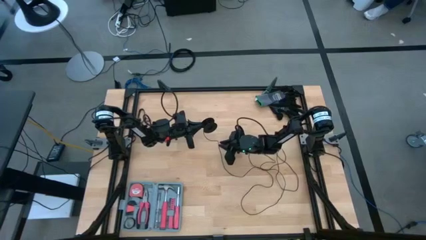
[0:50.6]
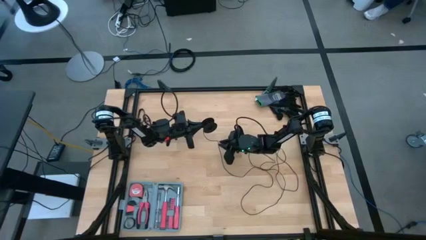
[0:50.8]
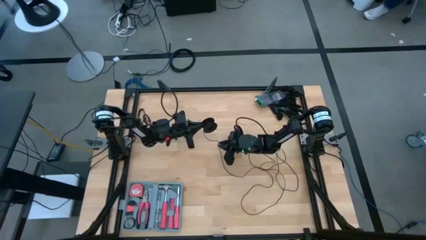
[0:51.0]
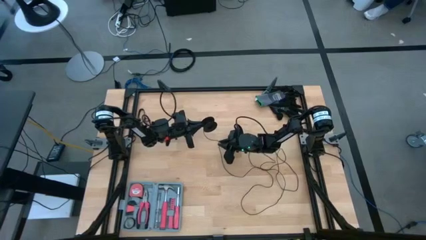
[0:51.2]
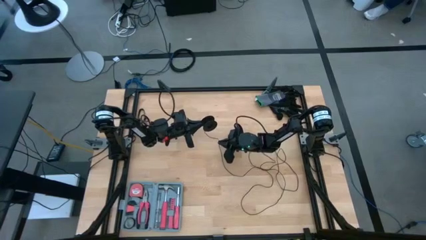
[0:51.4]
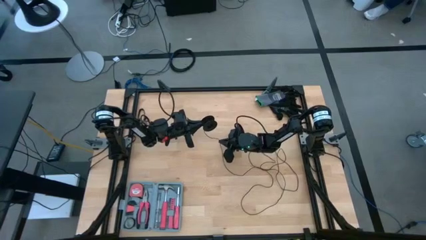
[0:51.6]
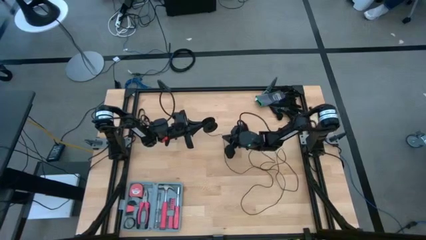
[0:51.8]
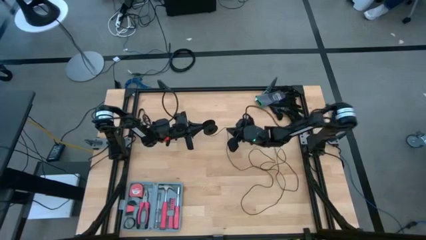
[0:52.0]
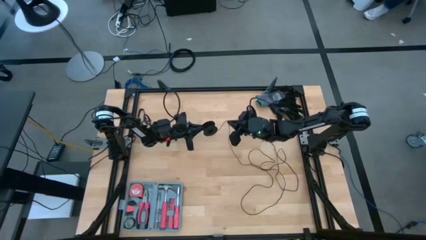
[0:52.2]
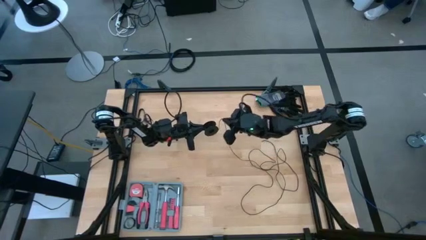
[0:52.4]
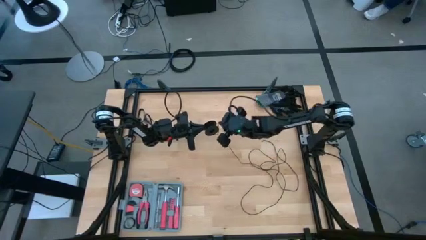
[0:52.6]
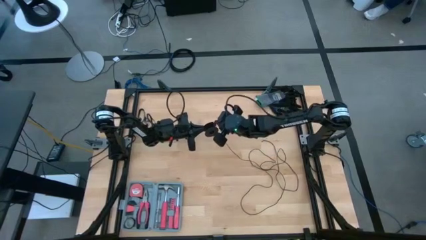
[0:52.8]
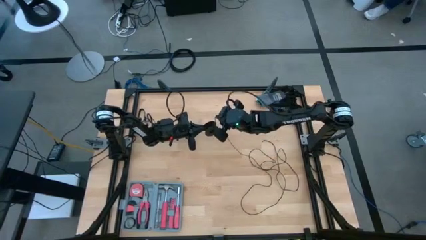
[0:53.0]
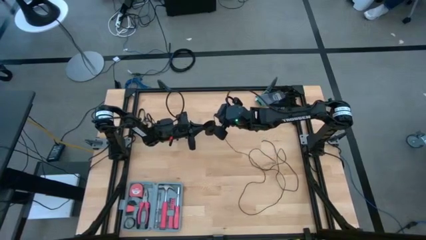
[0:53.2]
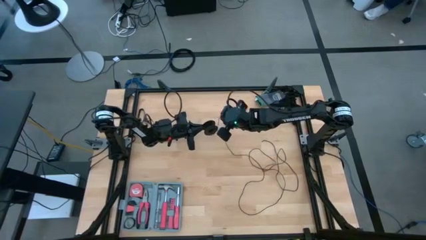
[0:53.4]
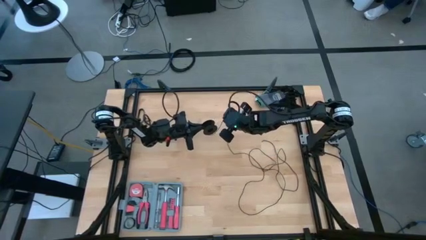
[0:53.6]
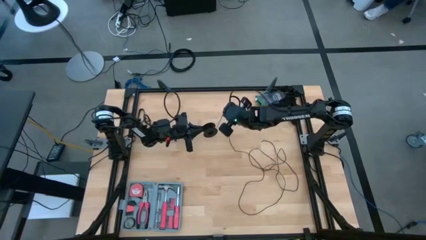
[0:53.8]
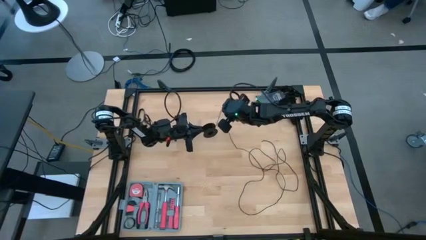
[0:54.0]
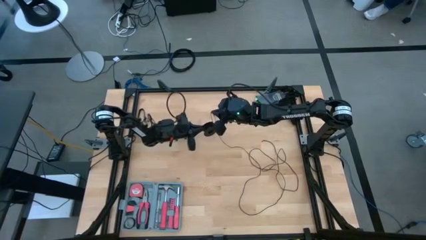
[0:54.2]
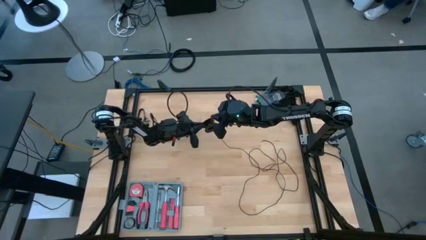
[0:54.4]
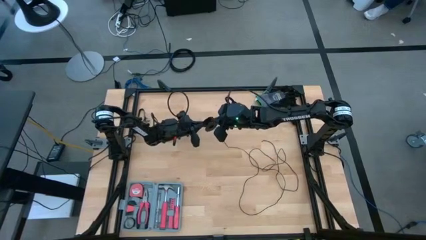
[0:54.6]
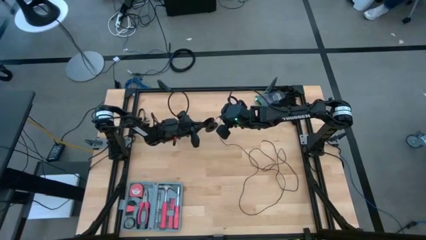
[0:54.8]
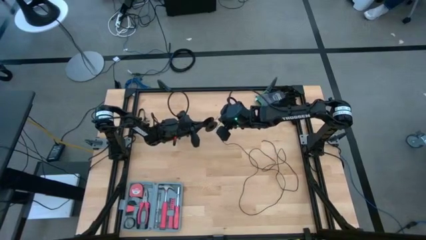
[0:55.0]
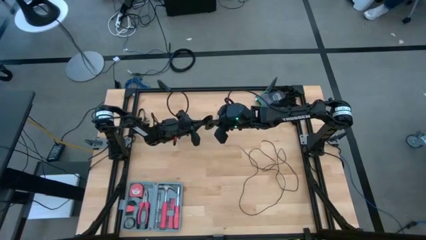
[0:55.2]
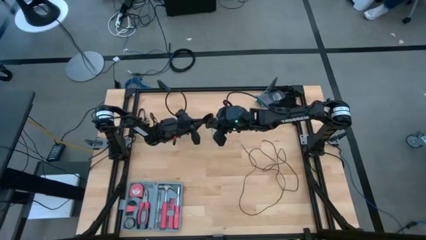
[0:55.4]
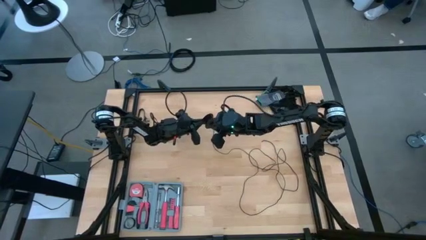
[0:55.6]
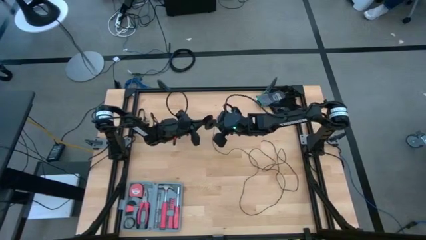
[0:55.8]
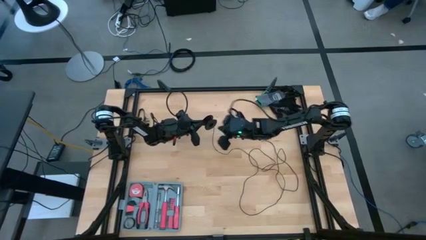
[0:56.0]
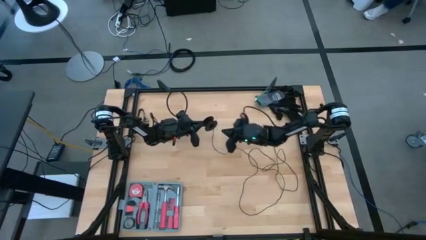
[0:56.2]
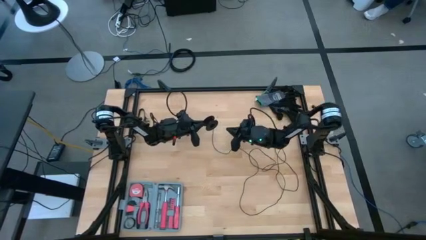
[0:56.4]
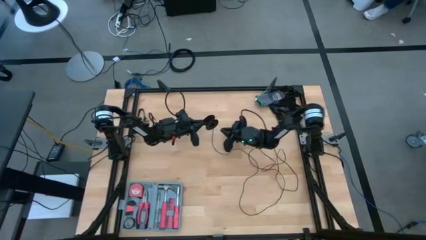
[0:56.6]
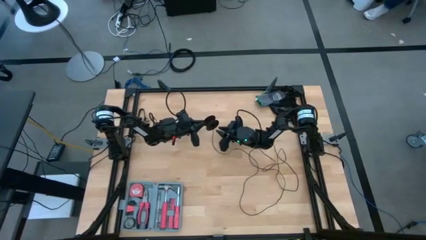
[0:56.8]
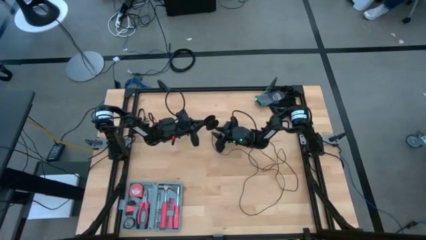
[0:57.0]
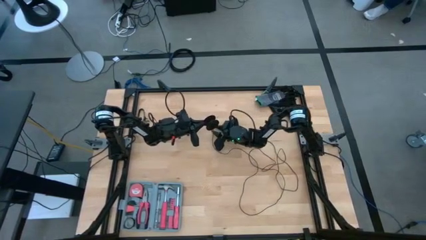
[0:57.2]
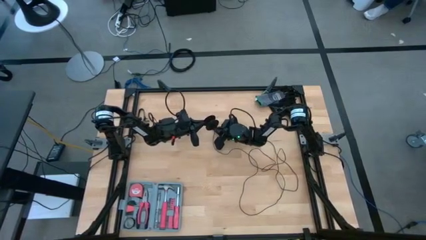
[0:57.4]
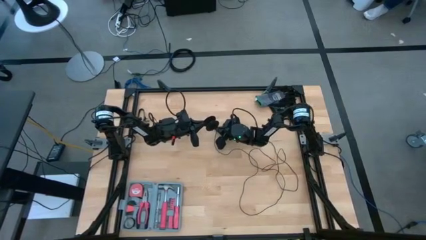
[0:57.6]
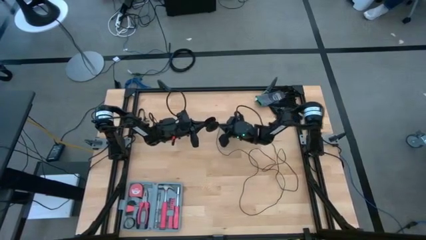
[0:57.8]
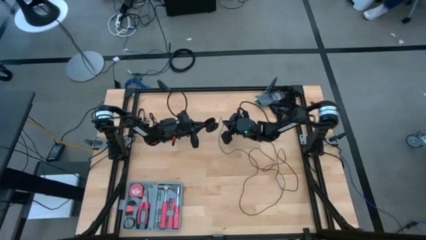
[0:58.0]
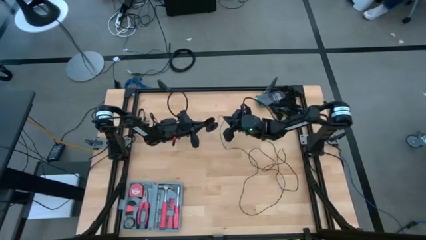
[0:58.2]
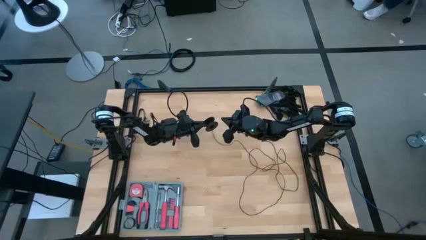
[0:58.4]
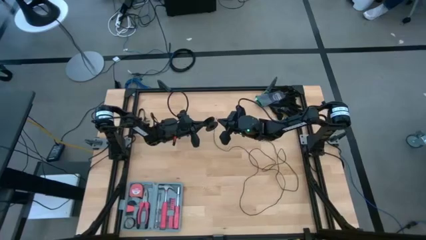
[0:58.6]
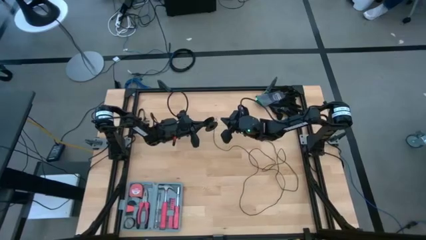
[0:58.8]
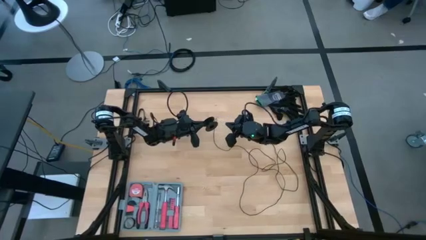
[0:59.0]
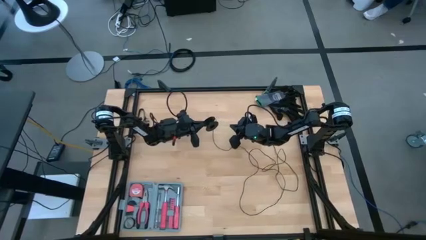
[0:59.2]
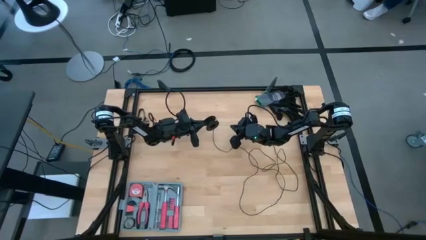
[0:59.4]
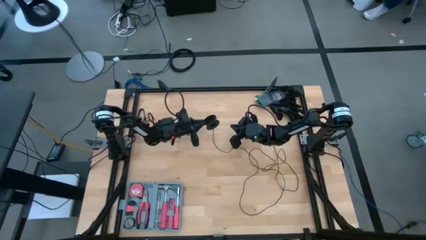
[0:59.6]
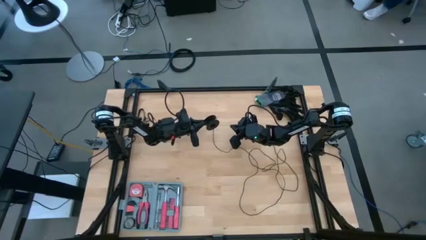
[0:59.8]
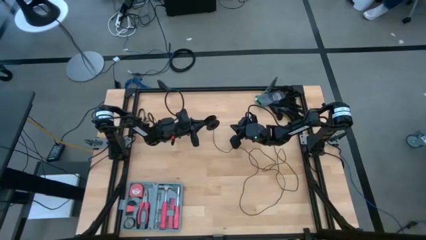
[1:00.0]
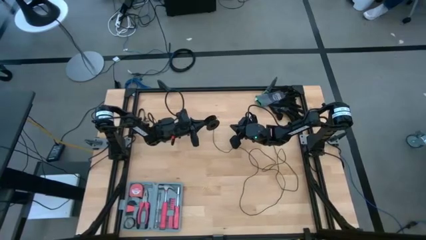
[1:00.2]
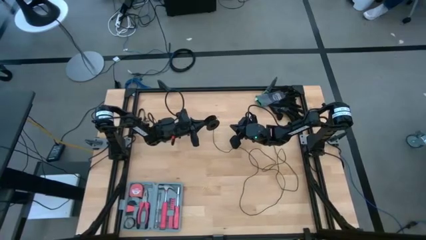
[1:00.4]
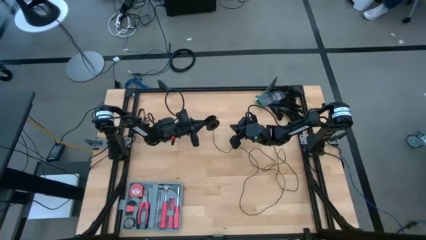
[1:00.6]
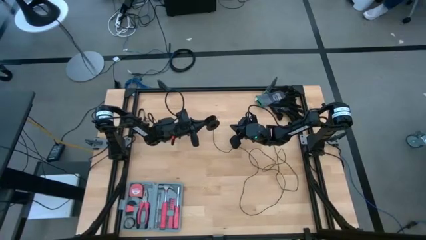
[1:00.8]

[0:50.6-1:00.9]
Task: Coil cords
Coil the black wire on the spool

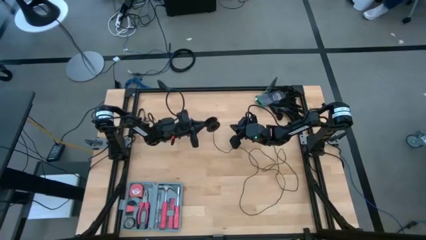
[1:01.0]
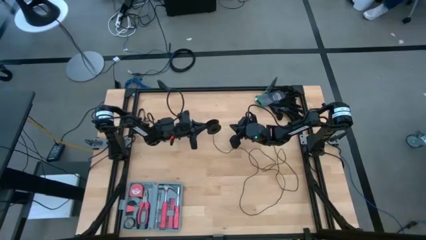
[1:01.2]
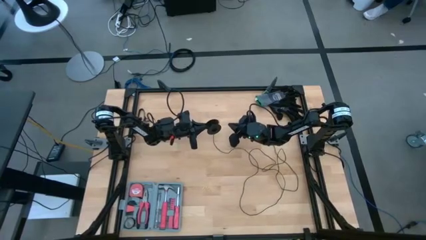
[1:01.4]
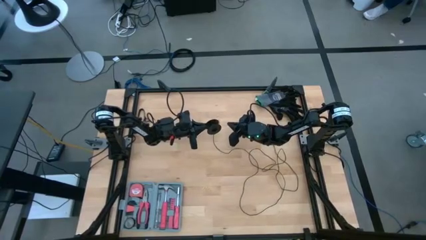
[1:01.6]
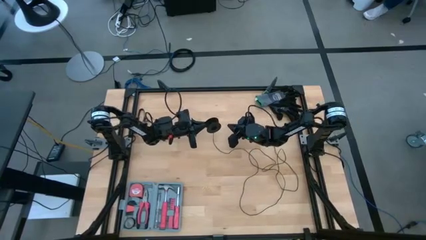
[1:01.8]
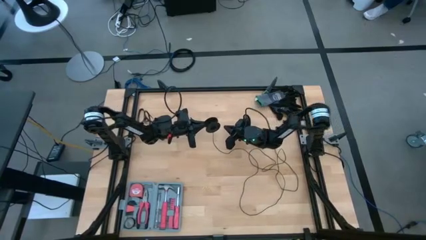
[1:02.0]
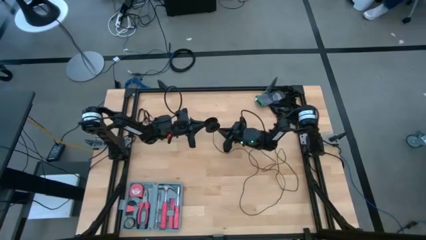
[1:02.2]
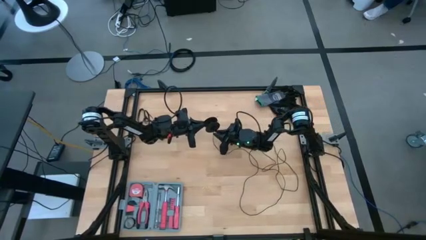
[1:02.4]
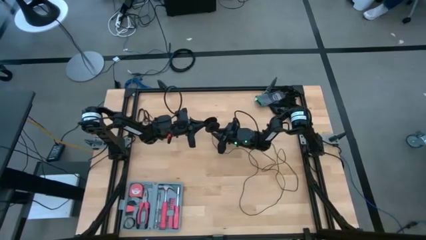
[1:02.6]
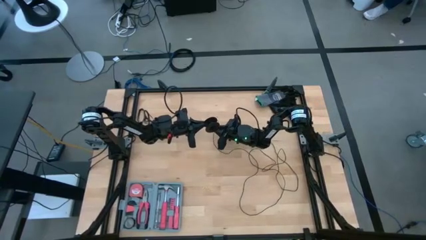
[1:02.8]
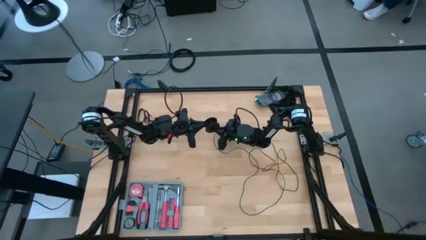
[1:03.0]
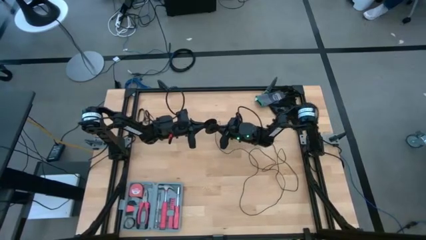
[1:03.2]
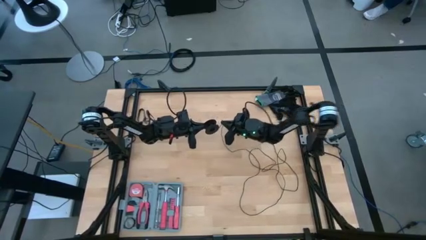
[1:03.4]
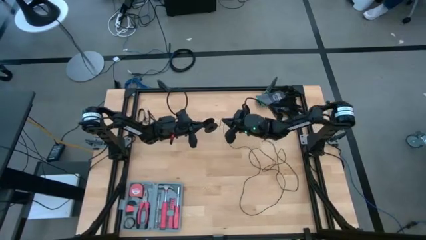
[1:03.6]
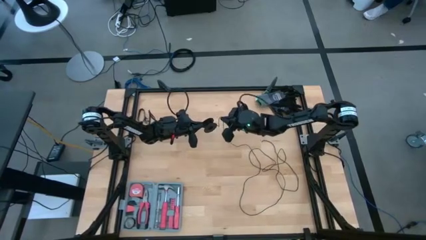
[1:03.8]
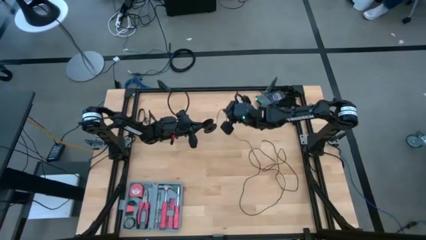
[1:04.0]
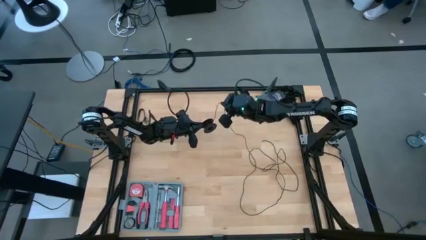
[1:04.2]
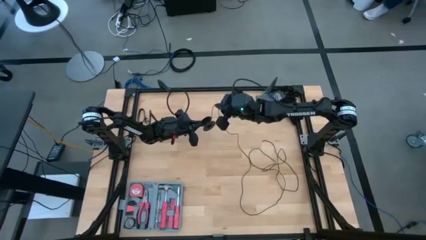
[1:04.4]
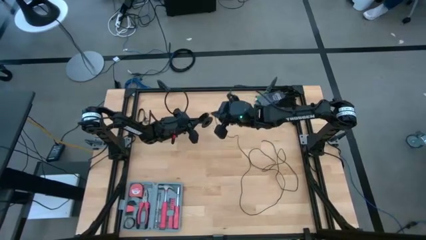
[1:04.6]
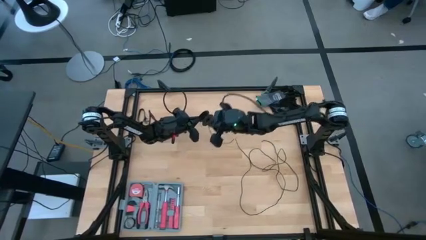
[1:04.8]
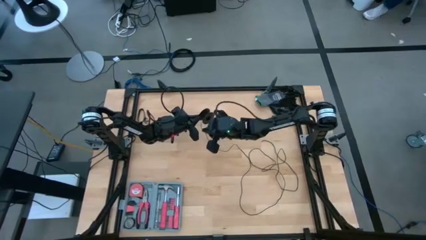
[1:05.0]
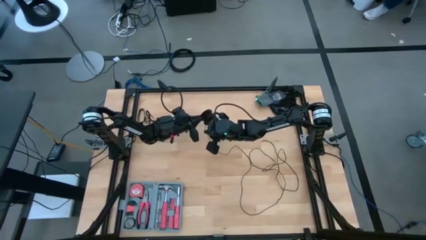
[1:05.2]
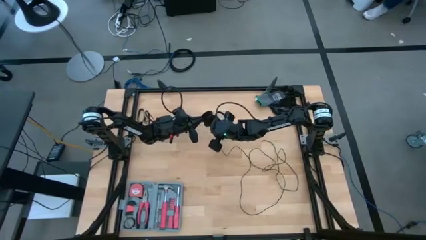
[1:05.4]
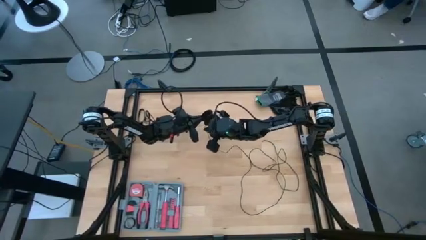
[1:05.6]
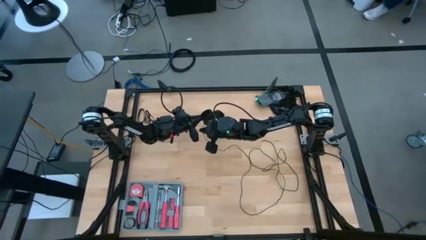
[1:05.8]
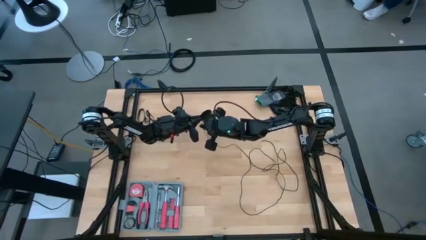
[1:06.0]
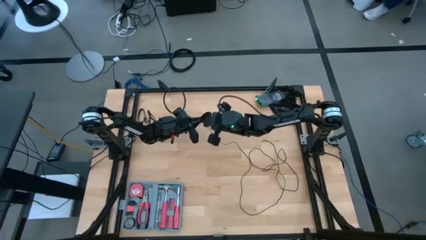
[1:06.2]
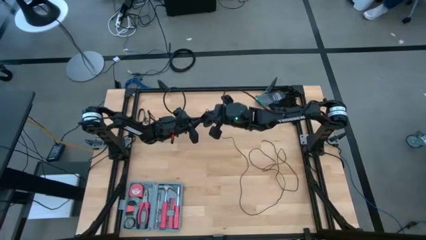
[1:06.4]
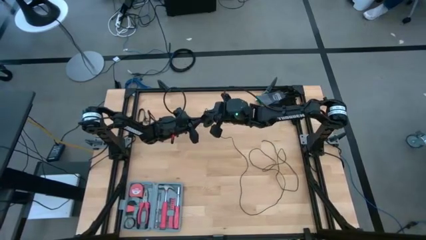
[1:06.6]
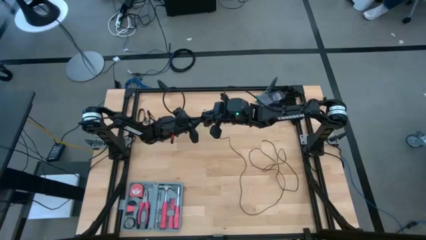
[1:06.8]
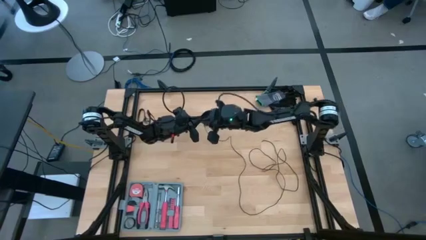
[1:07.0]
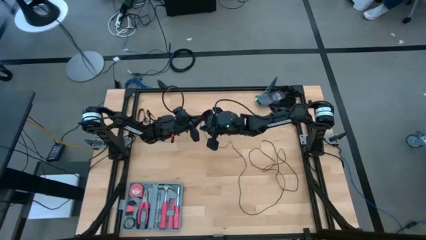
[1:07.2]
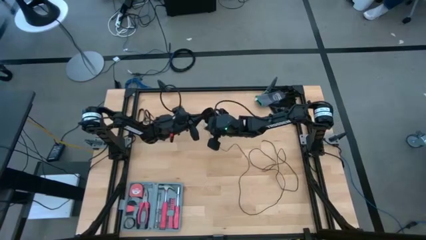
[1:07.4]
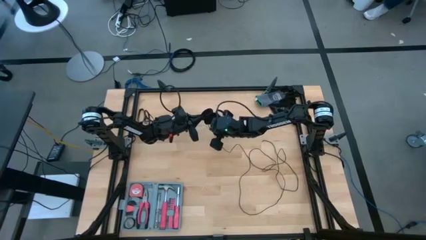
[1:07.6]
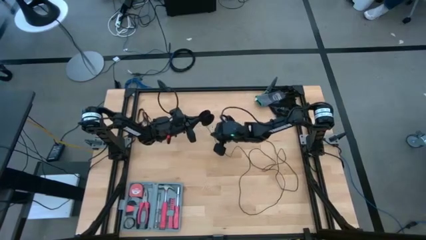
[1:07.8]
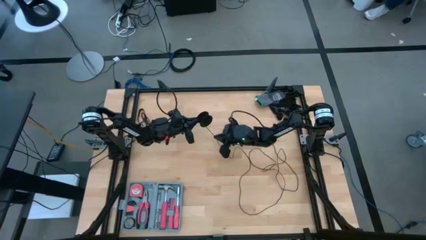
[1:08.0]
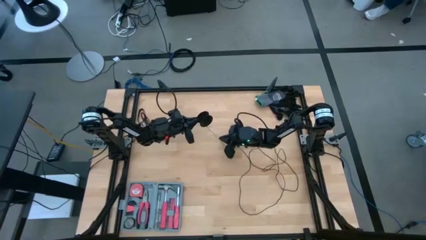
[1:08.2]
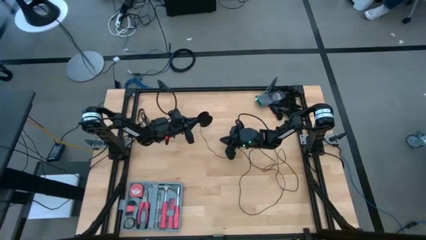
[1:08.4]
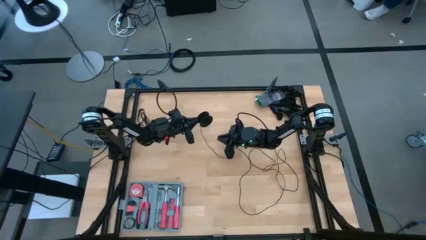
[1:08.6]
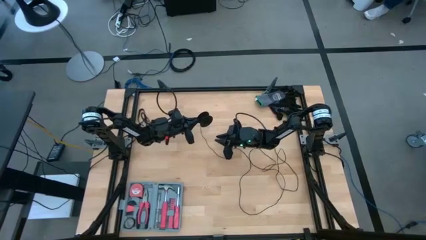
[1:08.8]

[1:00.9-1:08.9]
Coil the black wire on the spool

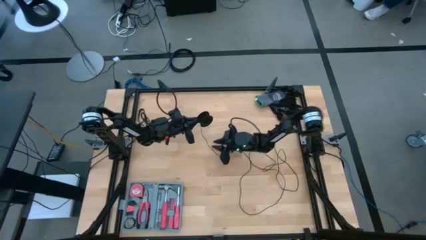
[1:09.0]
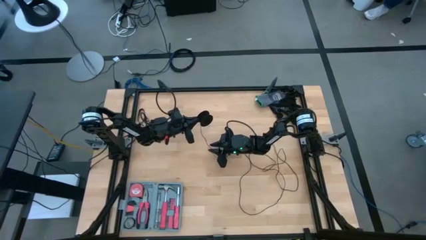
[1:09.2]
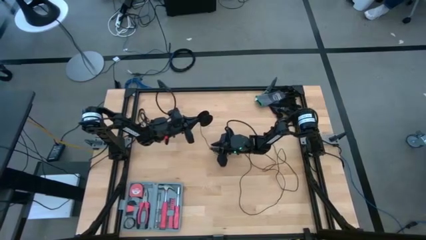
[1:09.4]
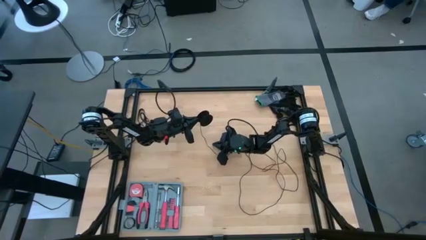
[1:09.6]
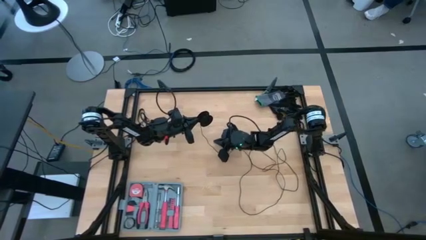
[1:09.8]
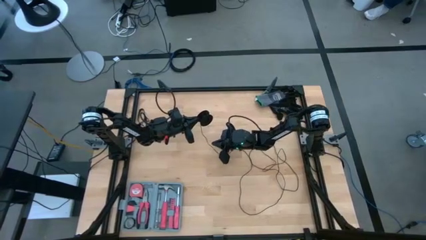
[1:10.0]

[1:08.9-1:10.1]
Coil the black wire on the spool
